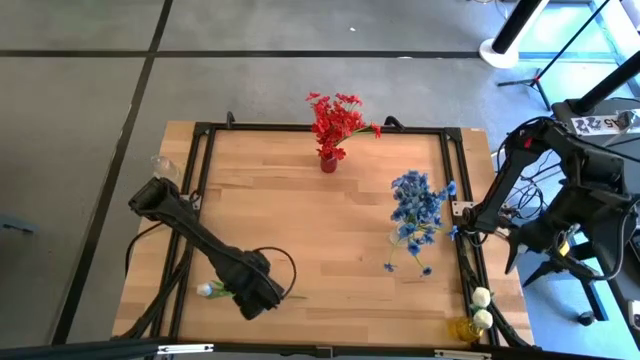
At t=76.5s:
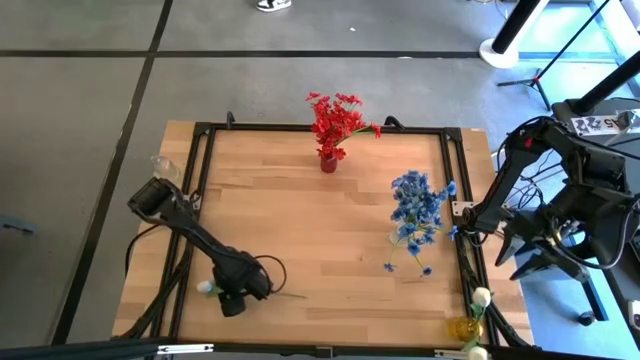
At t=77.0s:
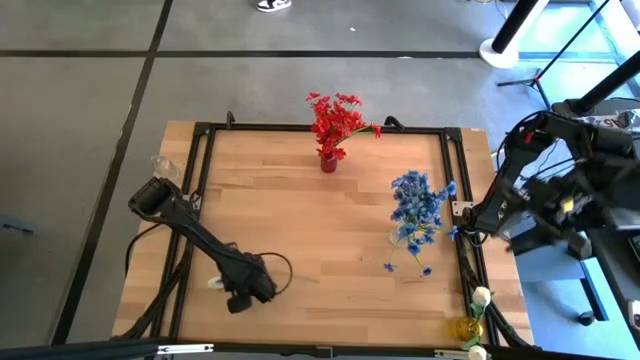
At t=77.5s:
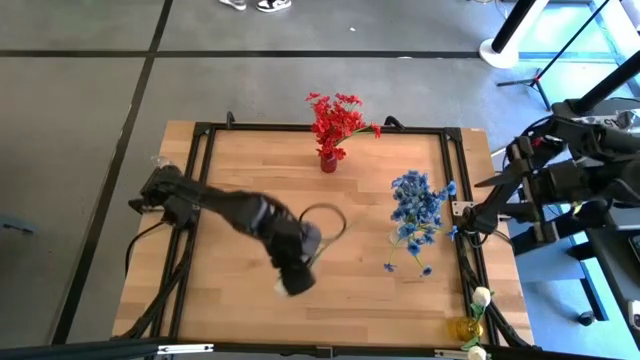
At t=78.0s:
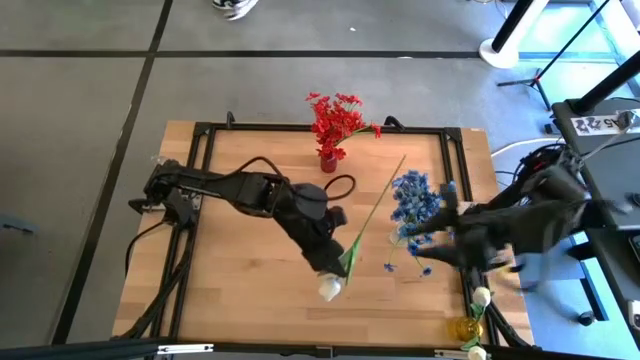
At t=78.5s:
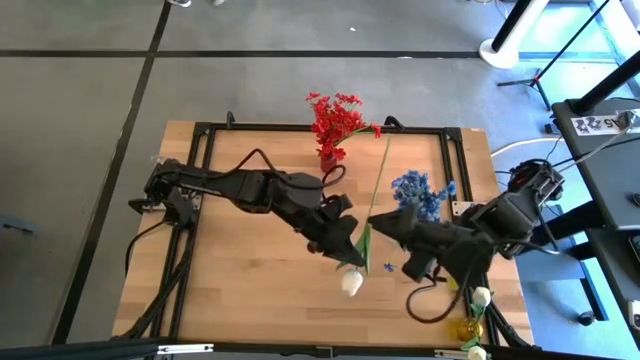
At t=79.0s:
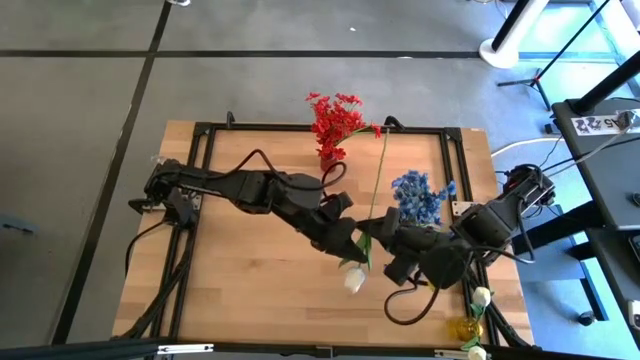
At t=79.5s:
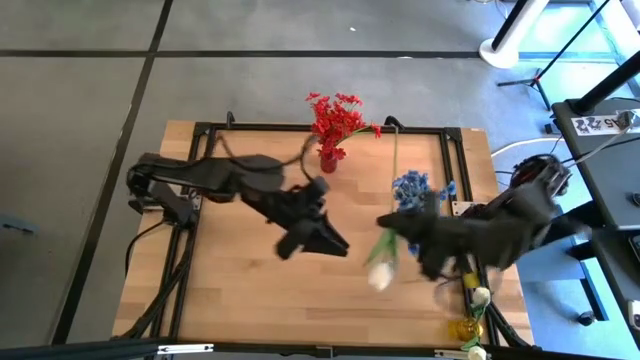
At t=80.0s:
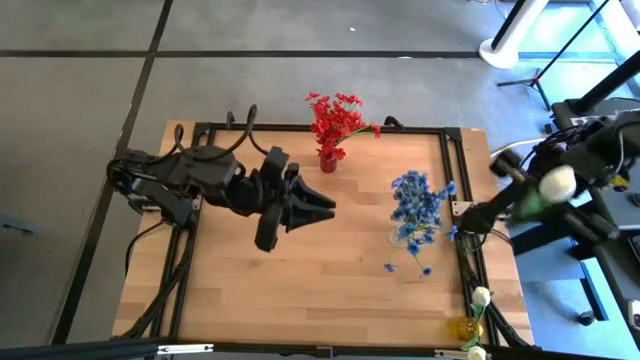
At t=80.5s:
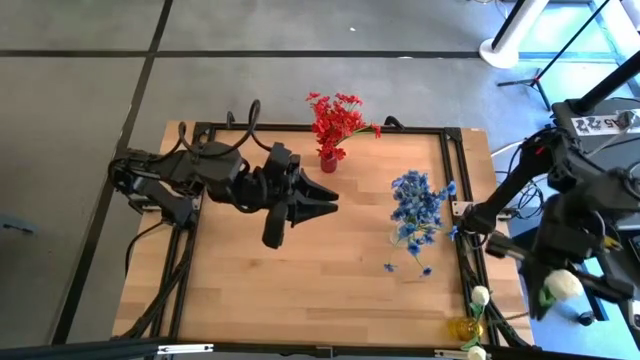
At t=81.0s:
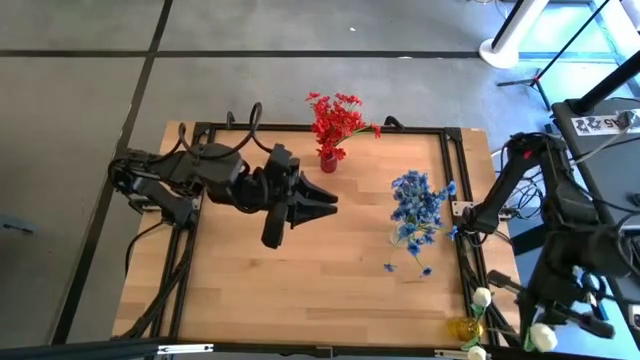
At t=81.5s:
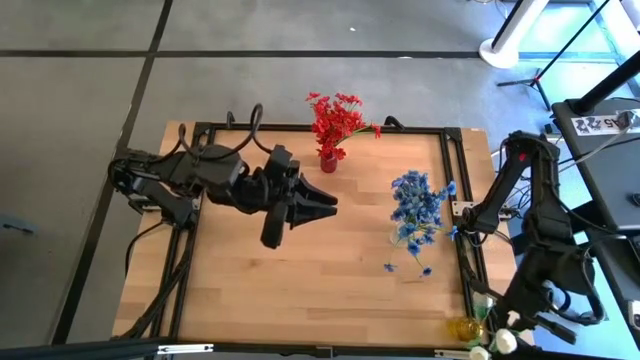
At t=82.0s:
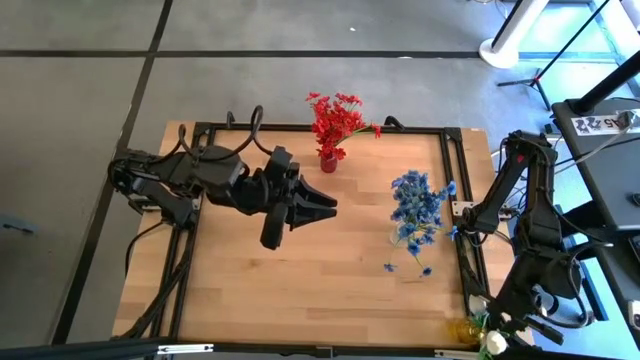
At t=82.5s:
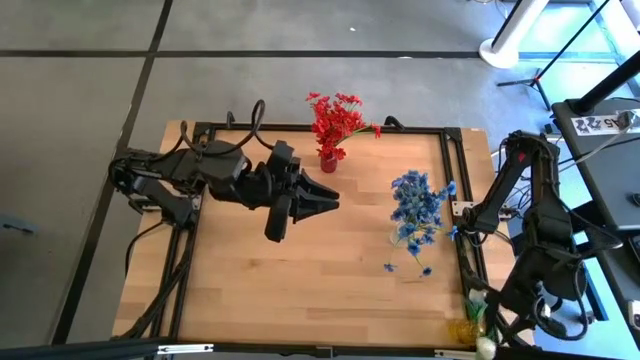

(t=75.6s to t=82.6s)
Task: Sort flowers into vase by color
Put the white flower into the yellow vase

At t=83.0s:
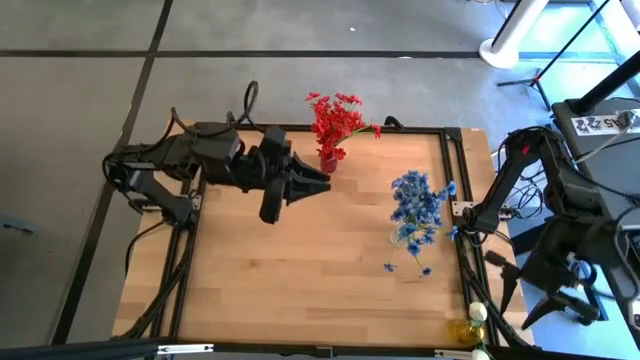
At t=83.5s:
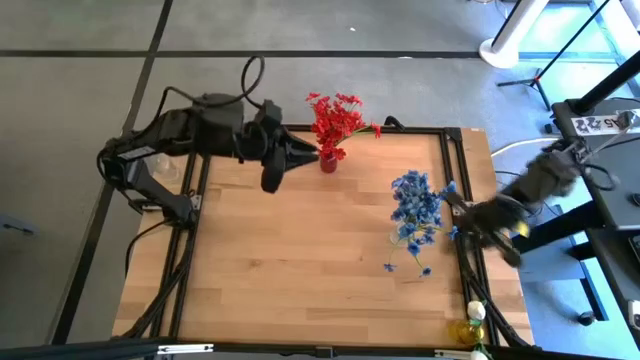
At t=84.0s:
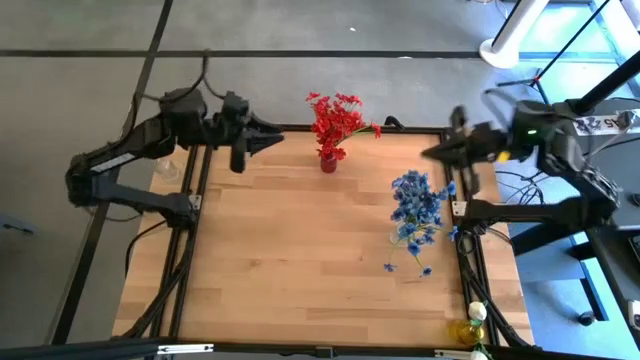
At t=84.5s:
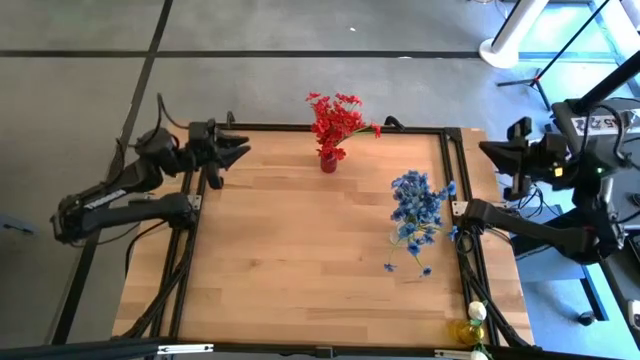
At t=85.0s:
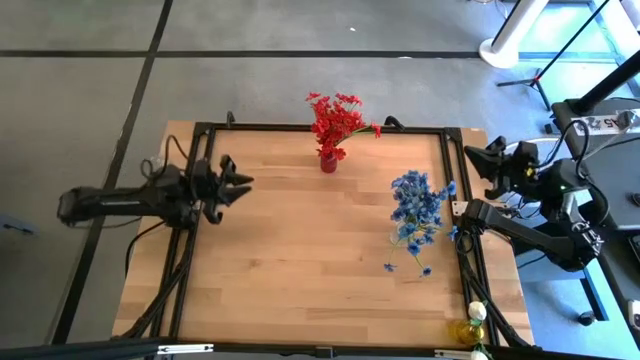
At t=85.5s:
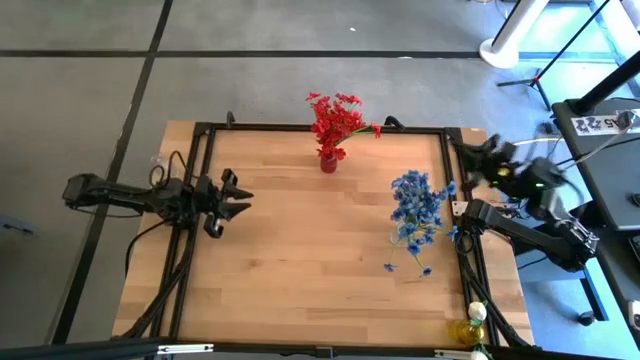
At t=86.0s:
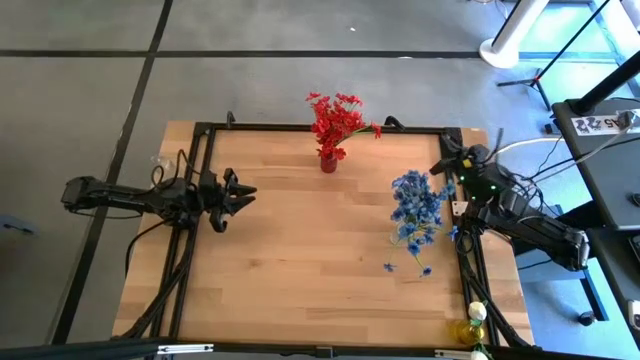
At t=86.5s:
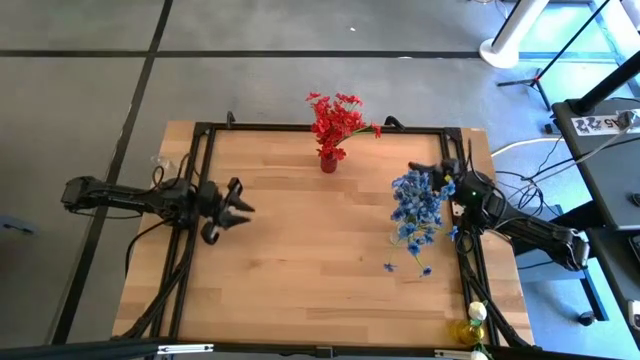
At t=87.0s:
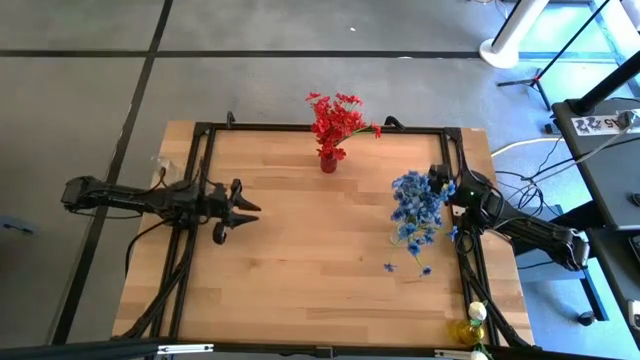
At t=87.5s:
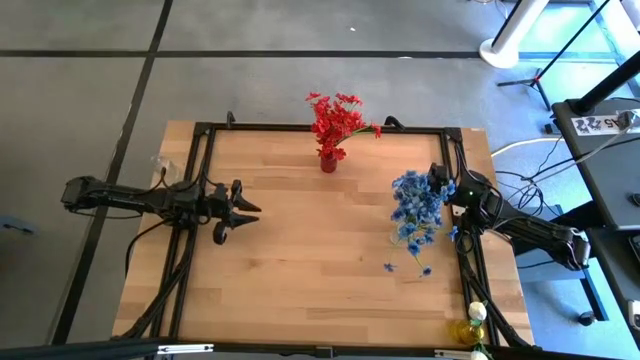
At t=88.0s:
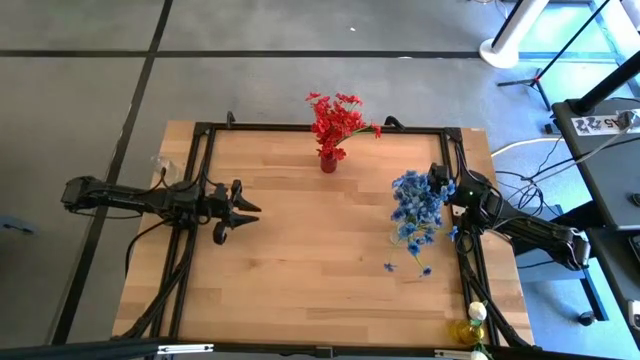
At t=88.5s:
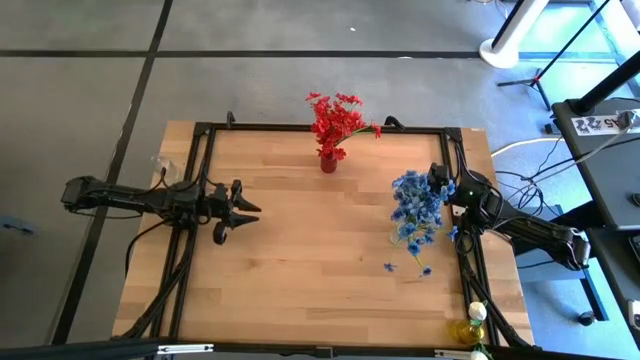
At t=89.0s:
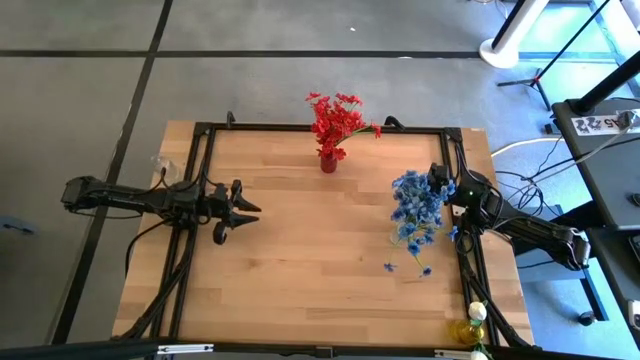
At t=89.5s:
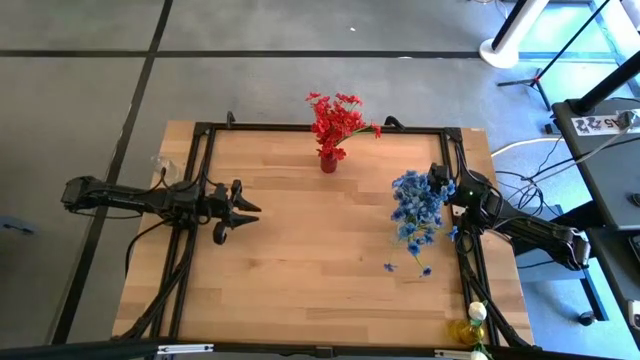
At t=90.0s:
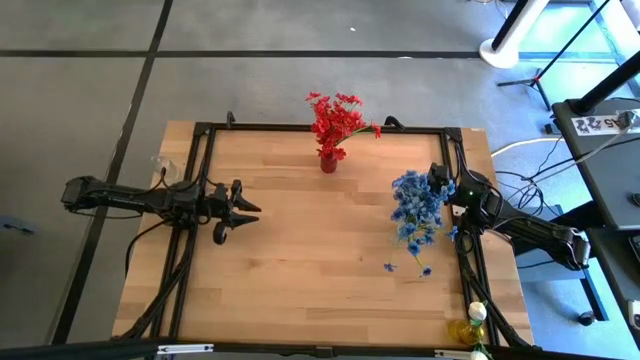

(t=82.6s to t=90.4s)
Return to Home Position

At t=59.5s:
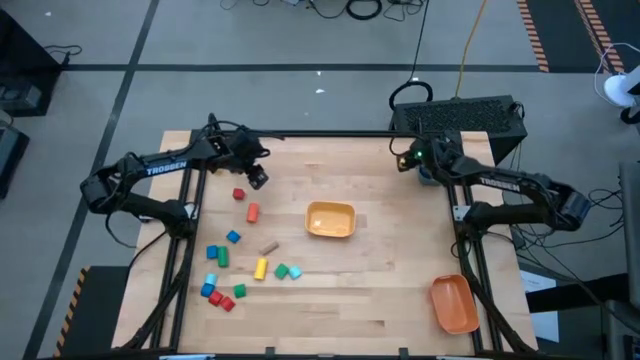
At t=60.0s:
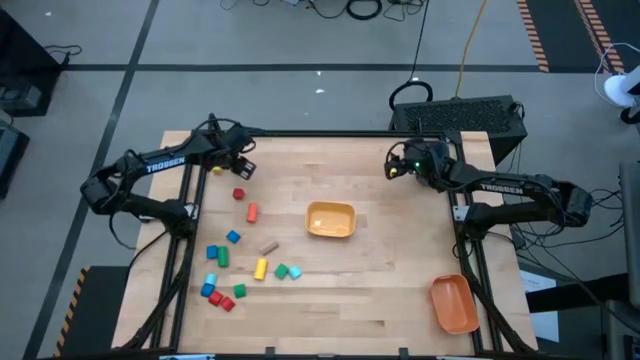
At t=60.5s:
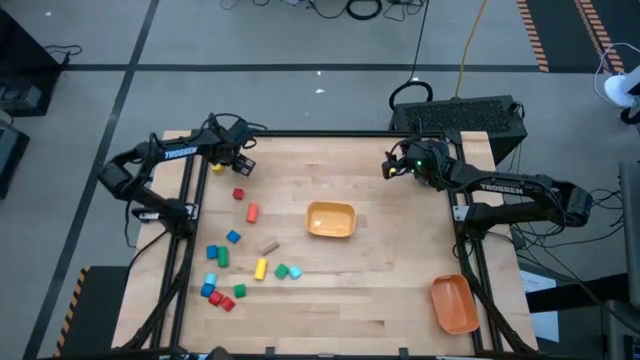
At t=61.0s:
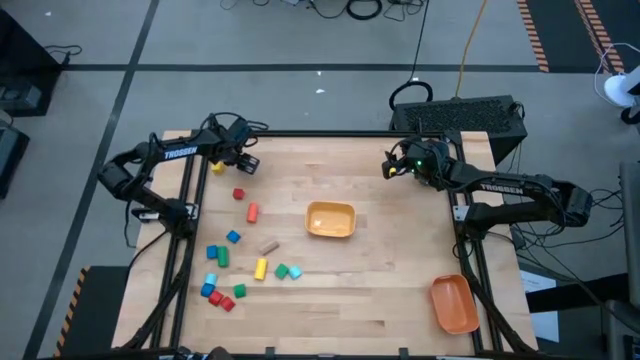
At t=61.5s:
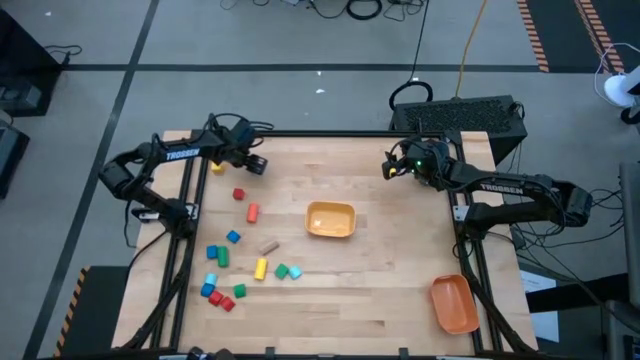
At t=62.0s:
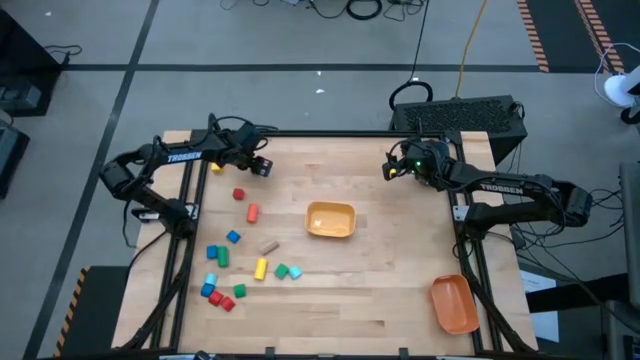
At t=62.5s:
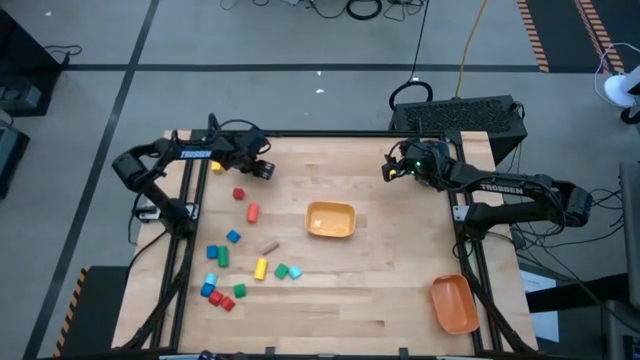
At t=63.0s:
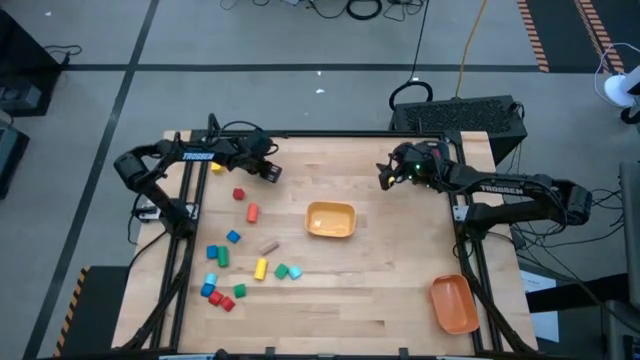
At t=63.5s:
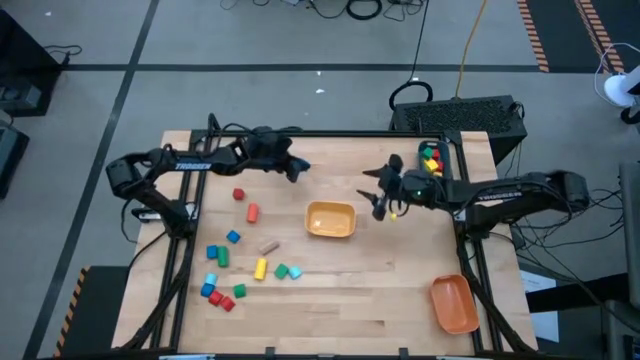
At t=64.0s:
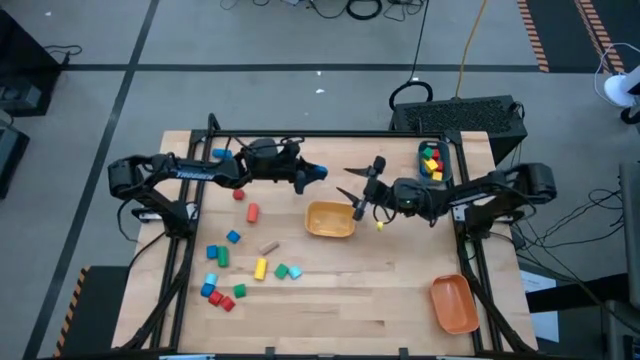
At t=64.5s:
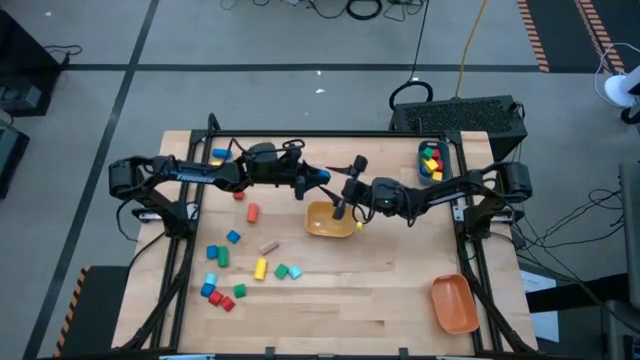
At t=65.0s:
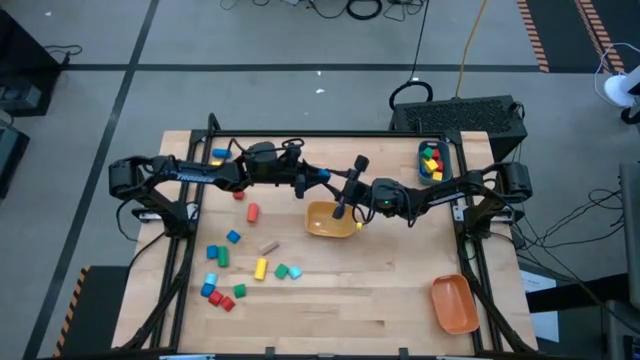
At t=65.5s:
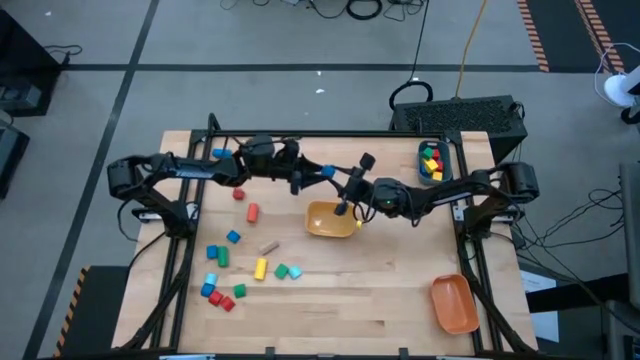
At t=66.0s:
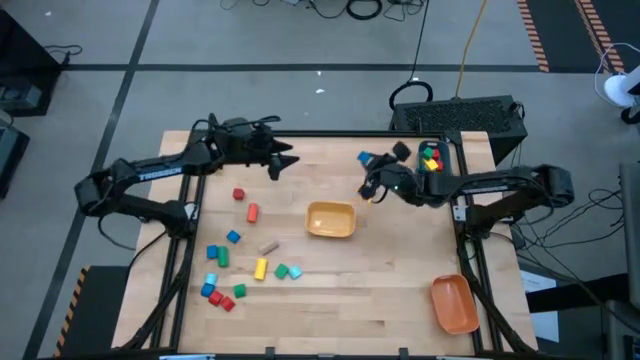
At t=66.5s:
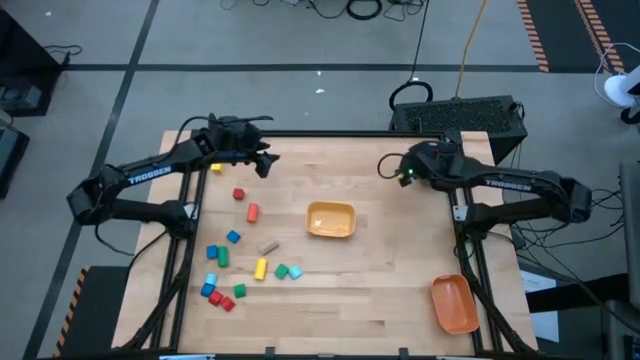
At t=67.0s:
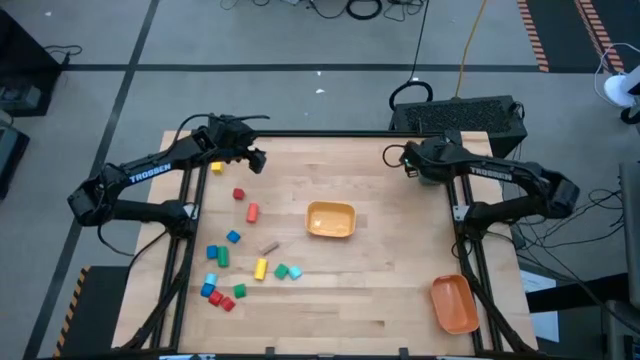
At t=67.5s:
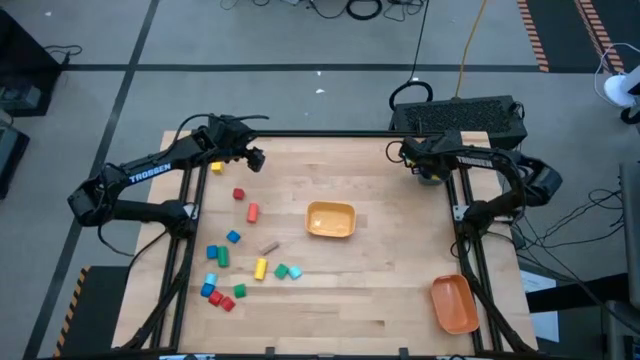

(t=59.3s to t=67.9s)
Task: Sort blocks by size
Put the blue square block into the blue bin
